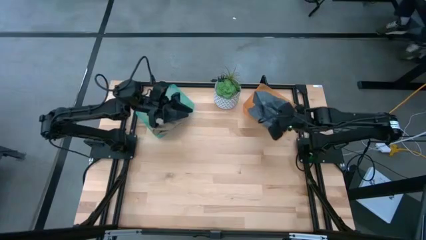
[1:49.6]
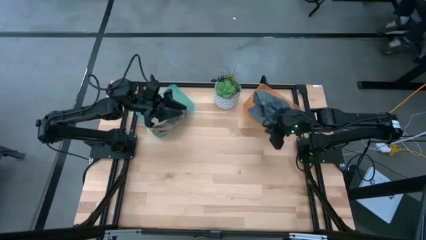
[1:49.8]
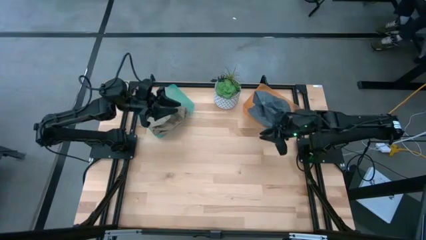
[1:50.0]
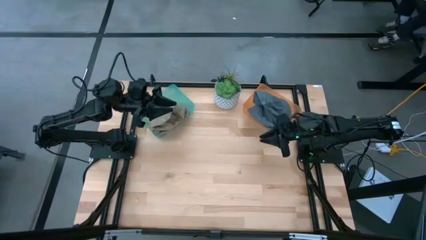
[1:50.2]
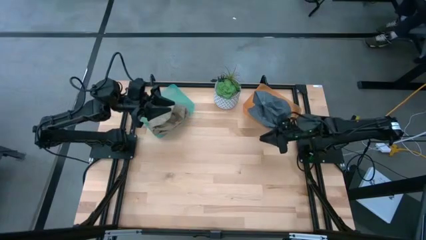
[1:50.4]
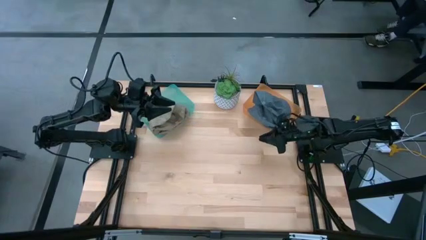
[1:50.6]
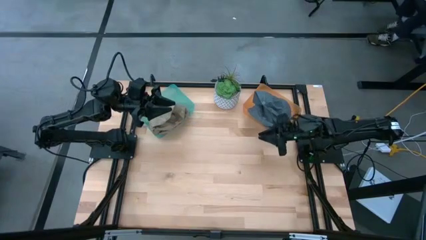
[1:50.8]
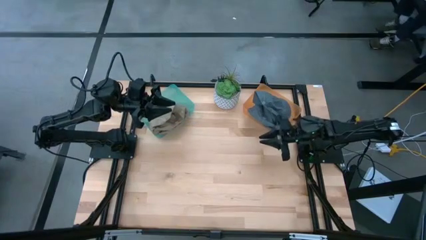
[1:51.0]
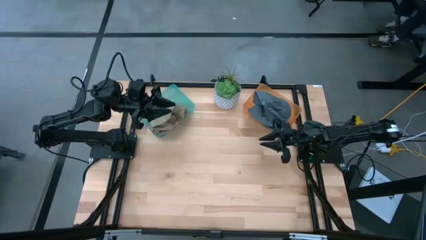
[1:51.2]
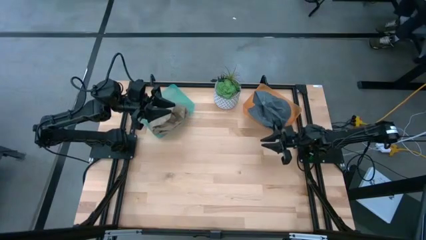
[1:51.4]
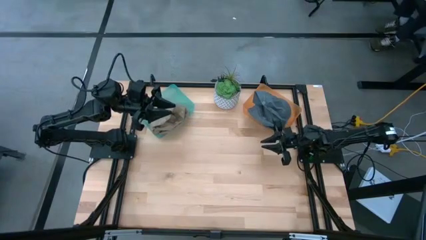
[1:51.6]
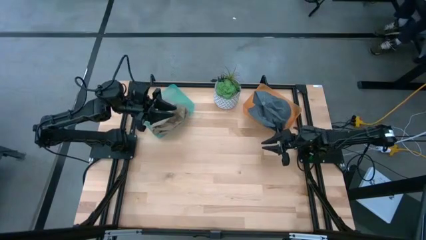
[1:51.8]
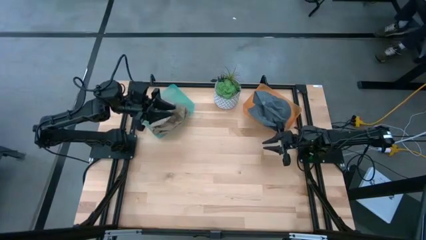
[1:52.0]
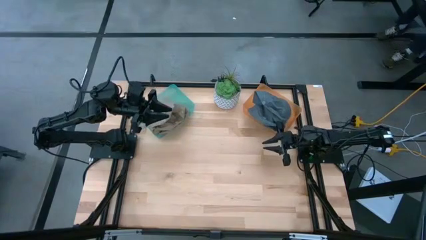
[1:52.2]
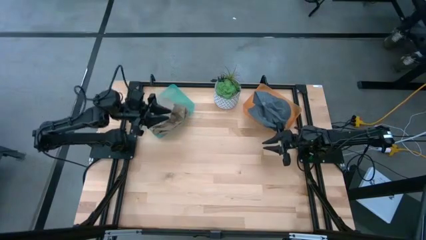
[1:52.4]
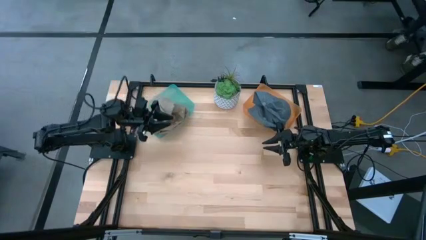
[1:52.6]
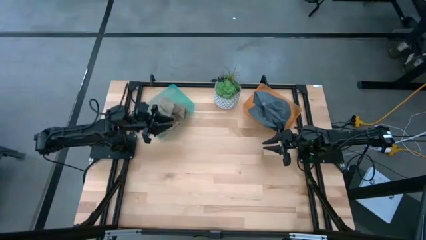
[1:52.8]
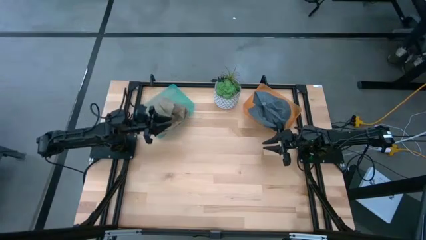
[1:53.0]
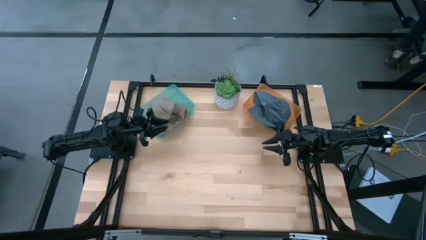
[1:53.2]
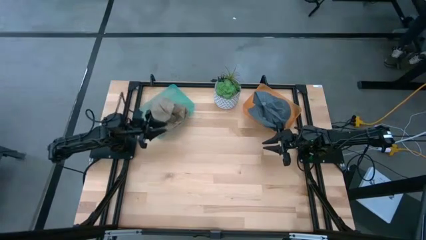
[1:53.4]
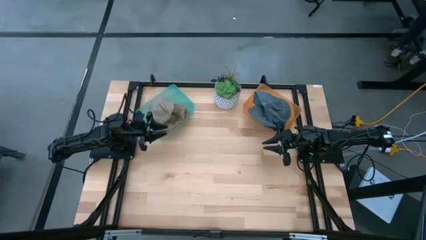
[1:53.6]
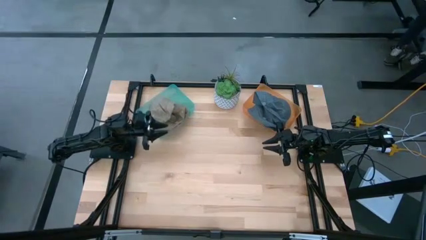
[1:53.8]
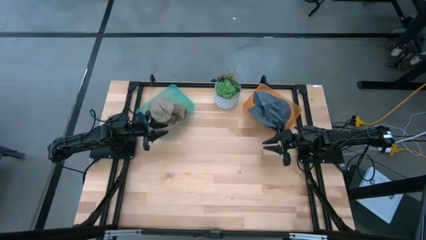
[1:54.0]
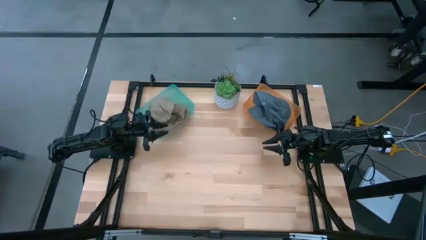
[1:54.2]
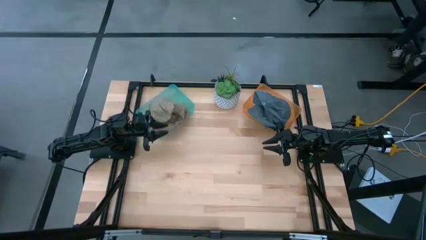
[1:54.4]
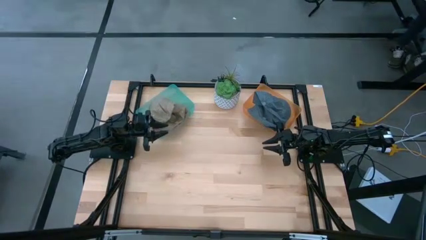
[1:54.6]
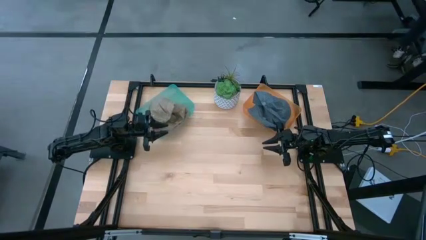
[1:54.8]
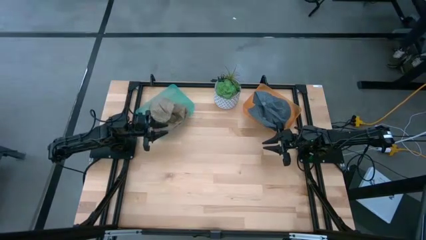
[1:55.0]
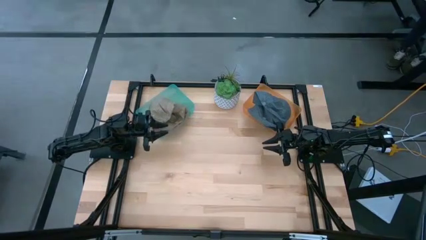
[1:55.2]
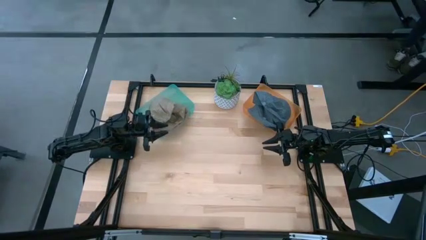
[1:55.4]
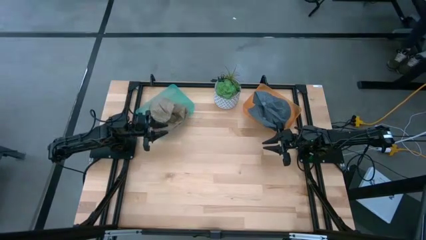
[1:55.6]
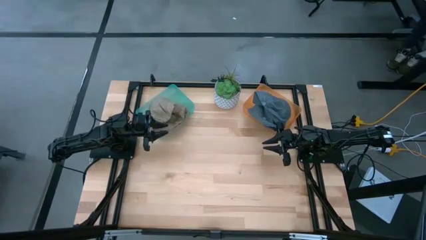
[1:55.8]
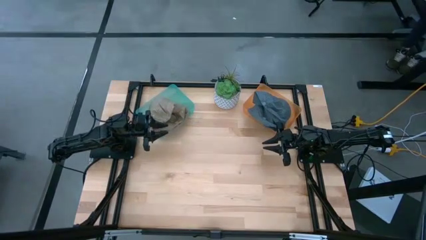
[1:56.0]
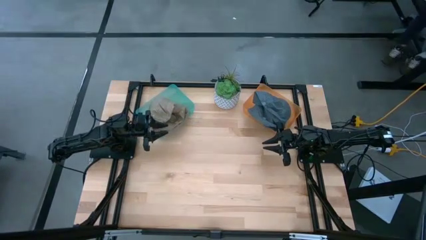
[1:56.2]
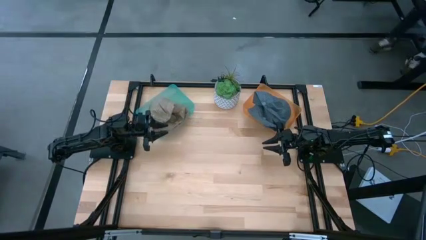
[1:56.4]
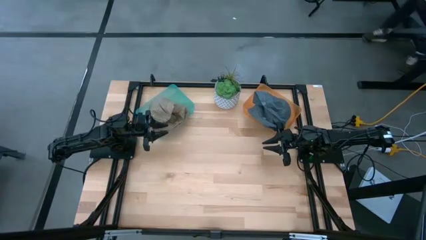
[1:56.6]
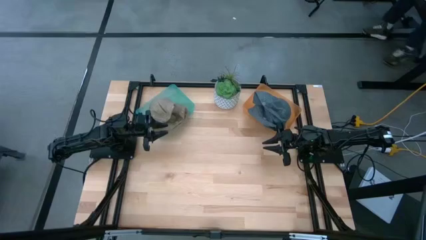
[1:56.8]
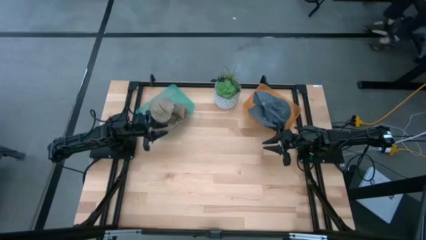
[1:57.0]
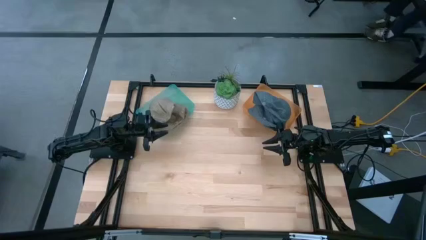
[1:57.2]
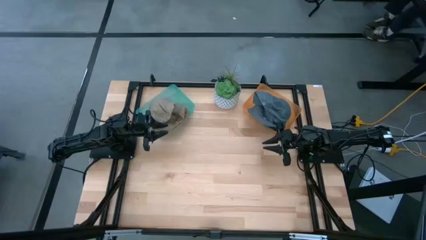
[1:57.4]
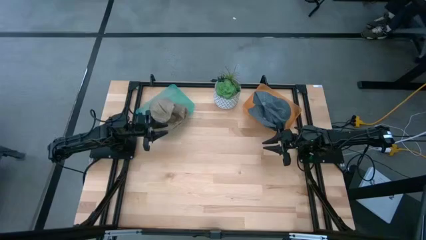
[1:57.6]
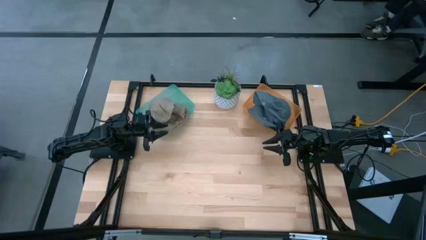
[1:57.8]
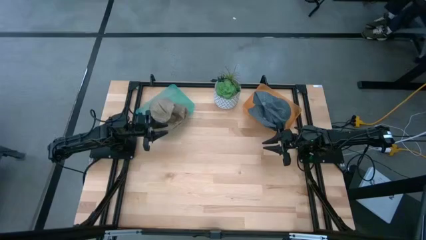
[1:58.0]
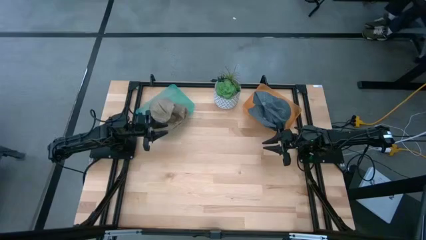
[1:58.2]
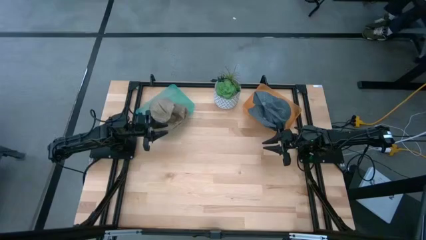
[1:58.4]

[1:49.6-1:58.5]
Task: Pick & Place hat
Return to Home Position

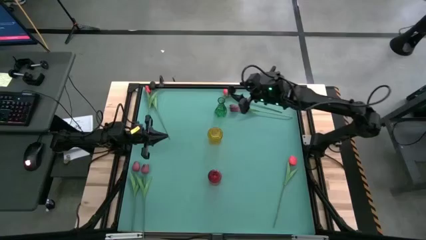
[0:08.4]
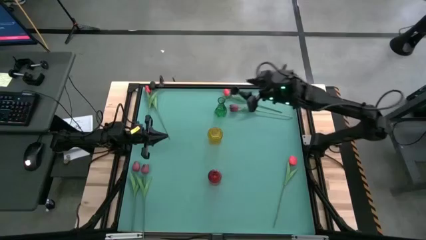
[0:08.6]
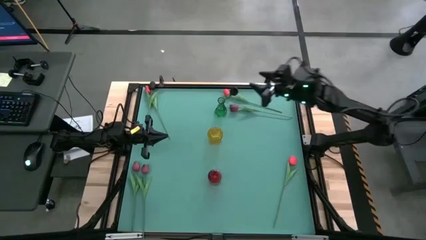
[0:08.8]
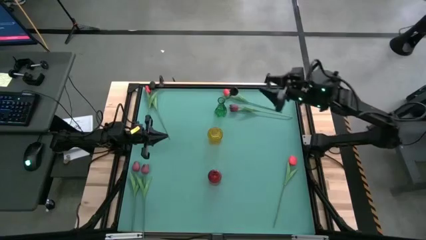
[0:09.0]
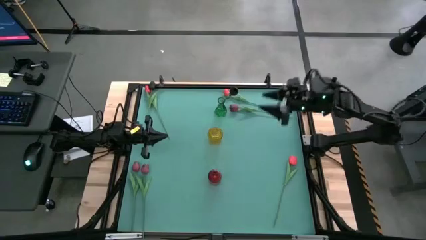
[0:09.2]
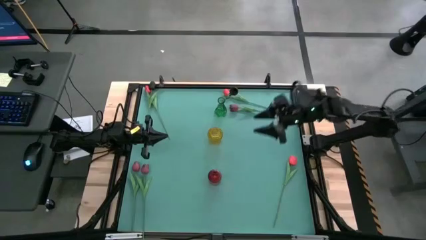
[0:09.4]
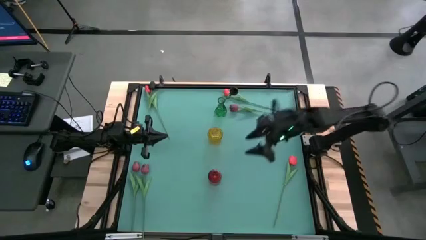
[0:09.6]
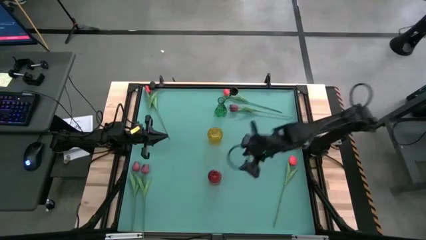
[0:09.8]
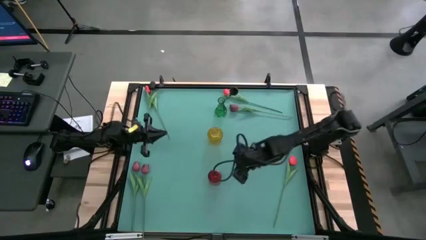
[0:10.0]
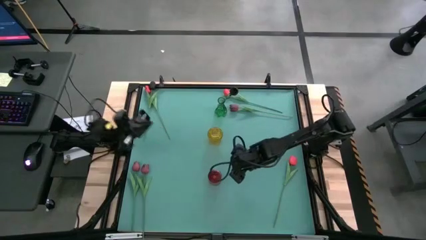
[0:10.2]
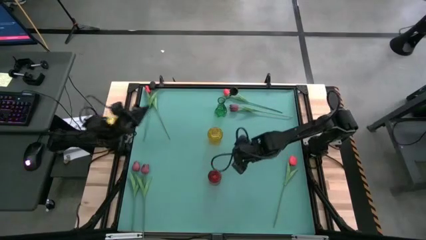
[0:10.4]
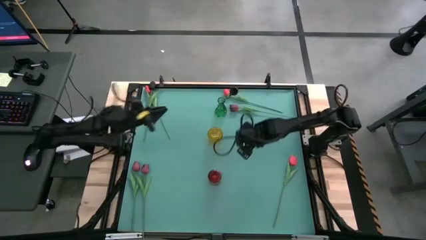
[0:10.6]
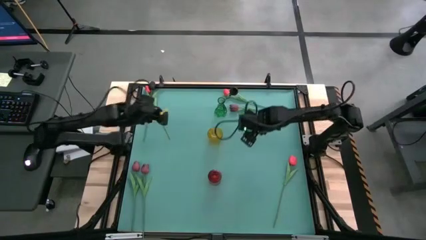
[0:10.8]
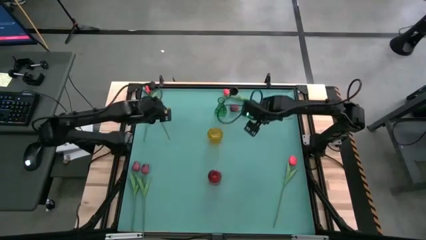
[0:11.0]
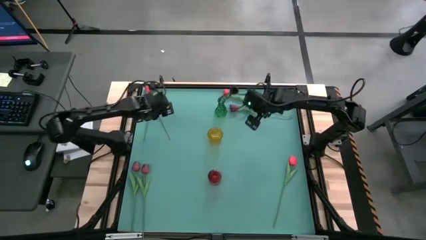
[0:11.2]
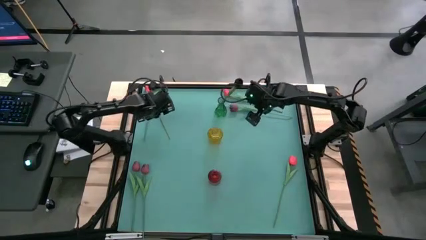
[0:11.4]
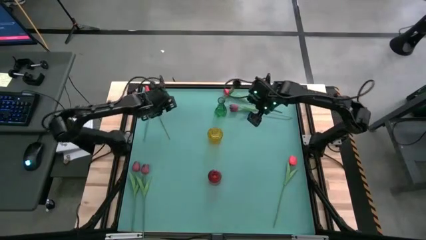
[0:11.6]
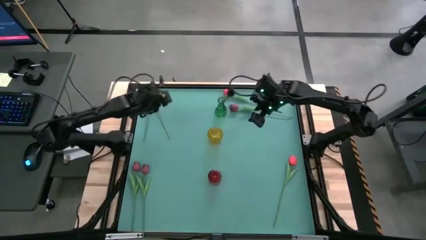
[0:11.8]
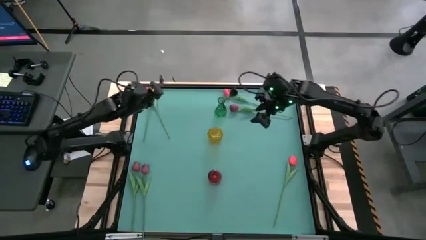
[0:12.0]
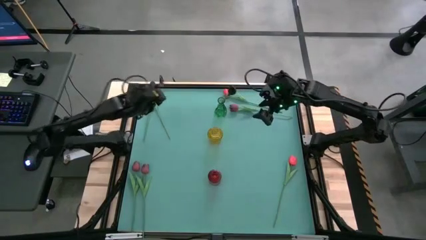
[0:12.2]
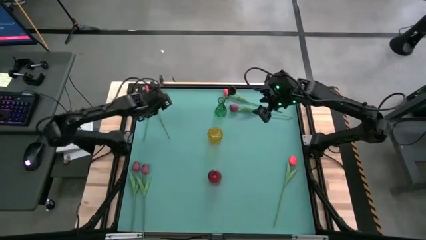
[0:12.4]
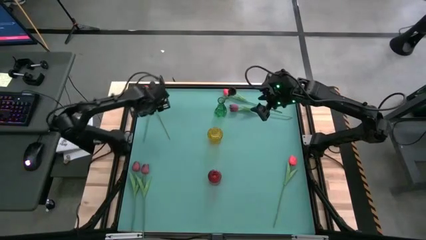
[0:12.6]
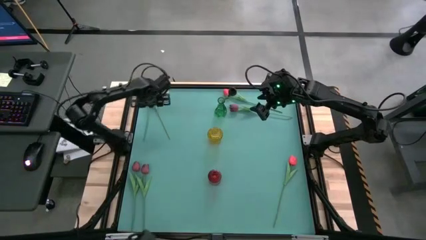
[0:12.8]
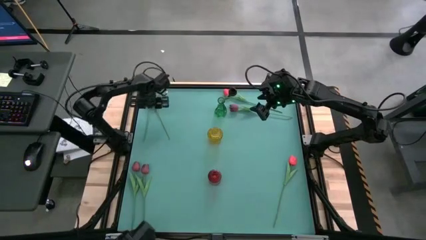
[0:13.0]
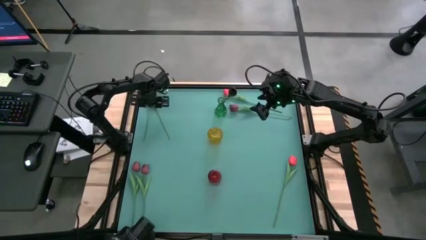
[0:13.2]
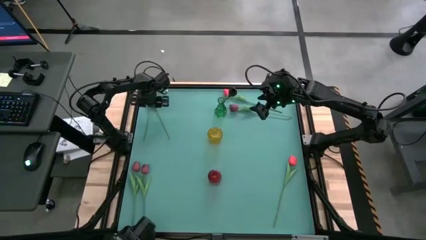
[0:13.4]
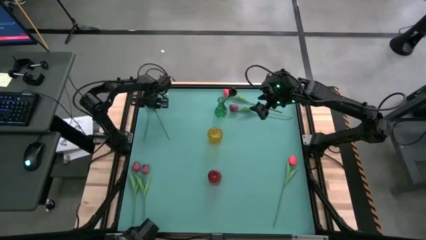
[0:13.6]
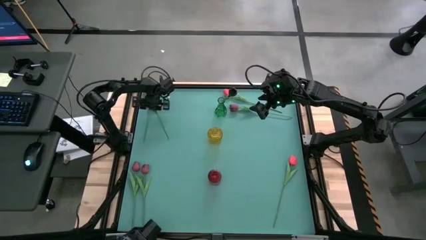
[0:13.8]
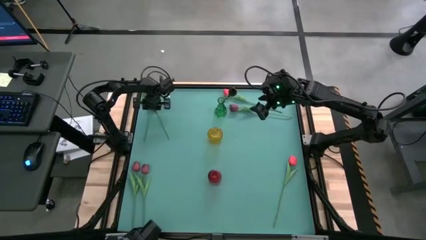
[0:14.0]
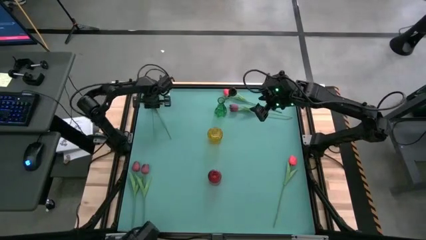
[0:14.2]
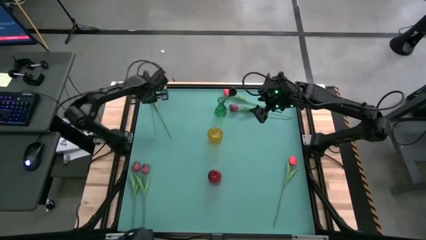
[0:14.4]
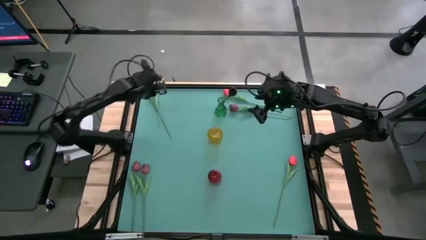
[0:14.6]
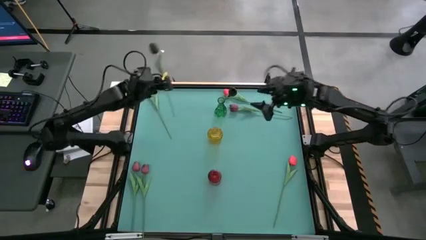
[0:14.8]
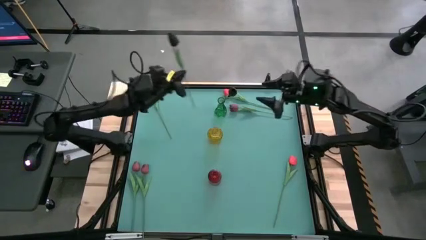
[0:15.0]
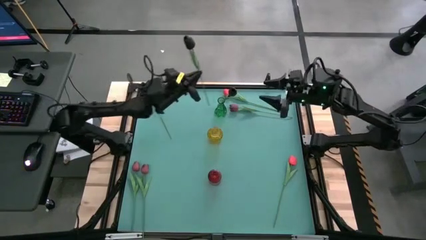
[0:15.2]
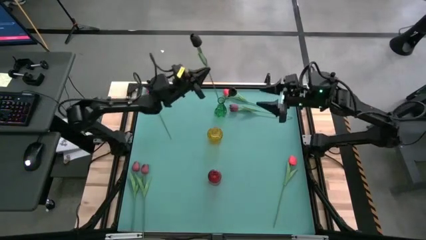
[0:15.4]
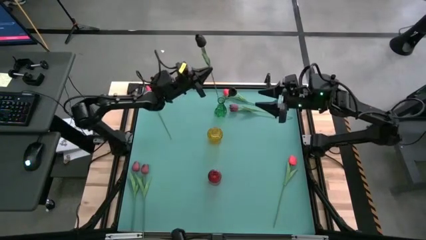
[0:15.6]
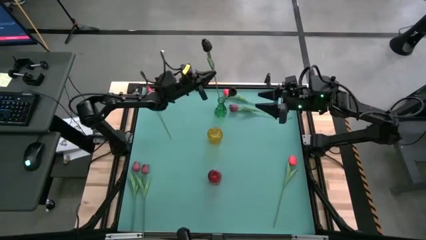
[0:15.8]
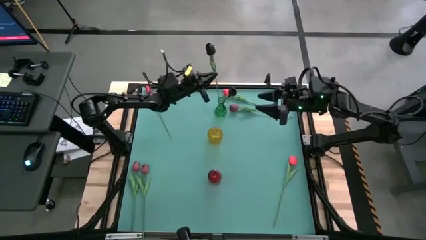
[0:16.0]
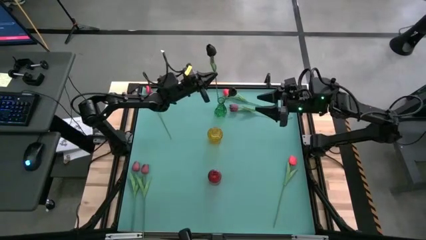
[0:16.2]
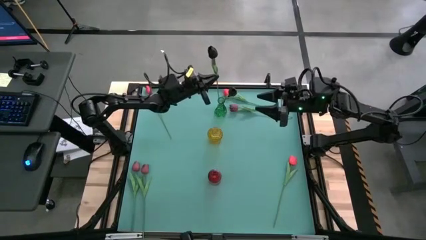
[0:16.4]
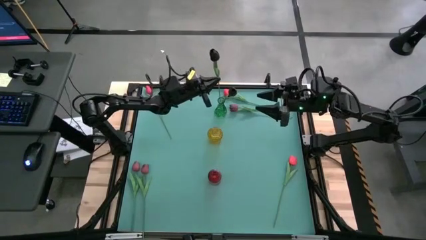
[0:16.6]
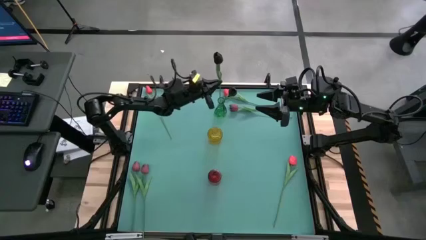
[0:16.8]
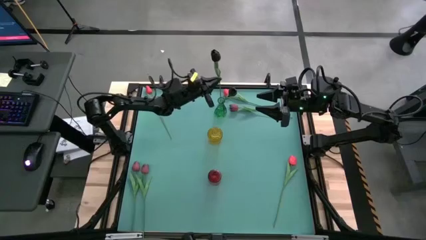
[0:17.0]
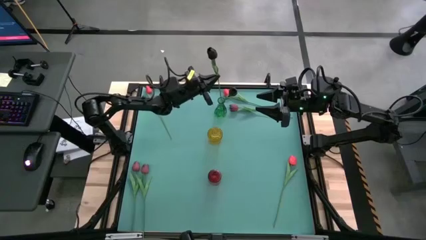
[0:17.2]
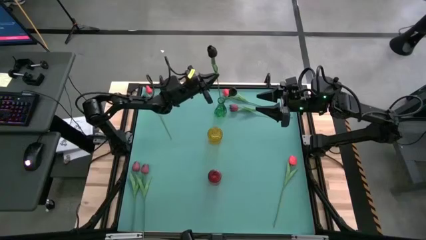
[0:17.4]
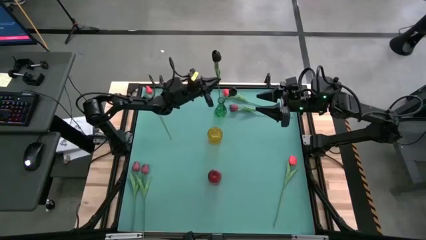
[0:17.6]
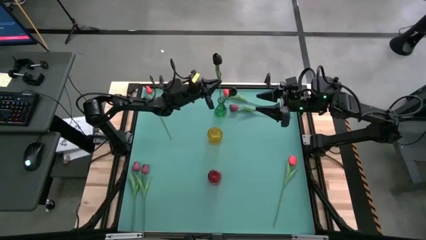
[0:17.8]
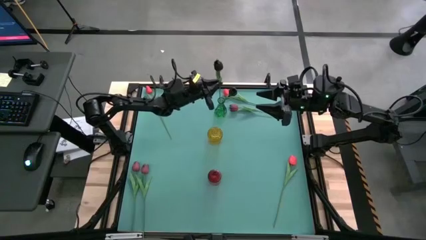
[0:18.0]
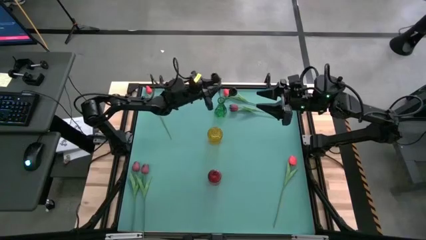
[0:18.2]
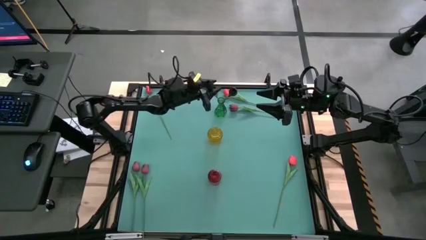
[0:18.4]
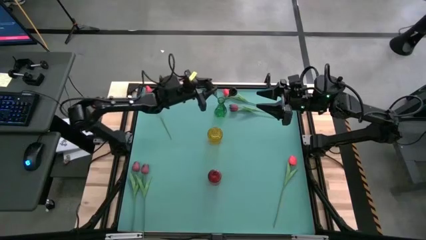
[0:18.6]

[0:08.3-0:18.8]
Task: Sort flowers into vase by color
Put the black flower into the green flower vase
